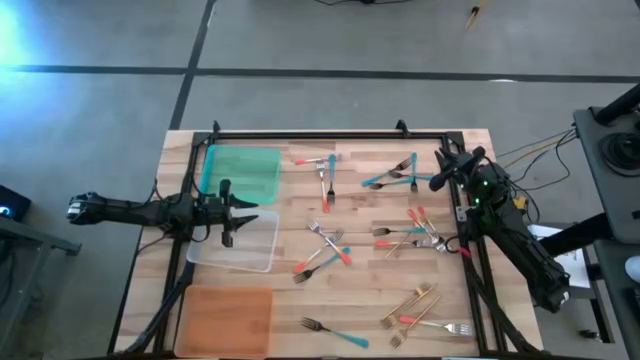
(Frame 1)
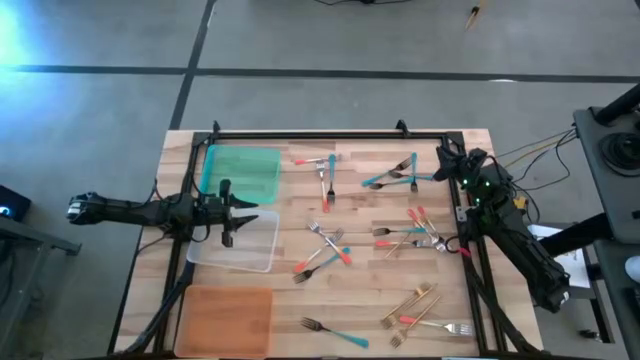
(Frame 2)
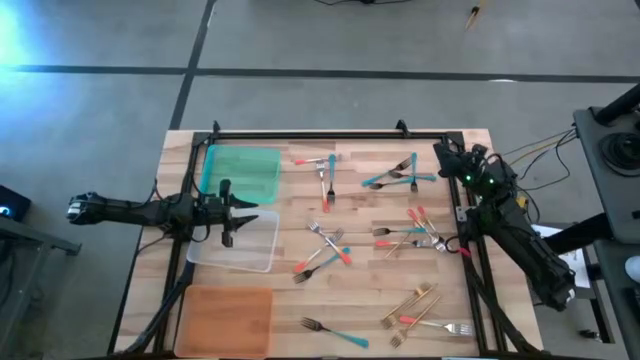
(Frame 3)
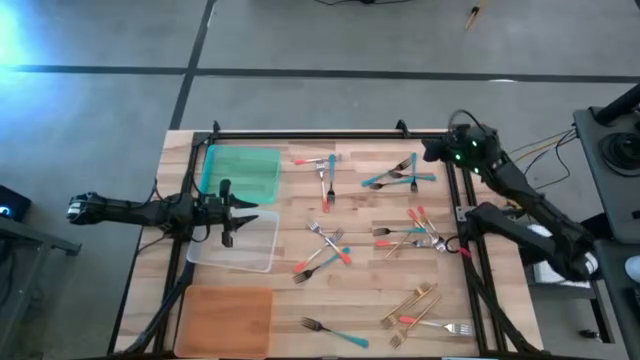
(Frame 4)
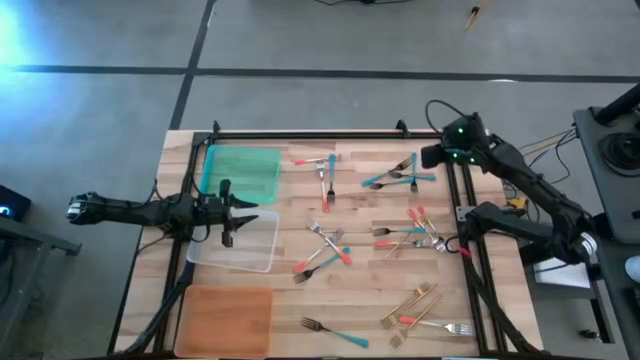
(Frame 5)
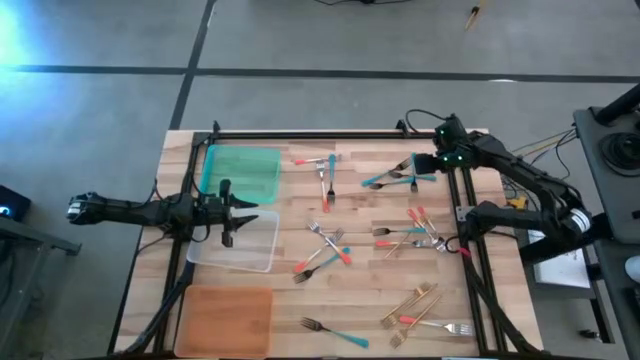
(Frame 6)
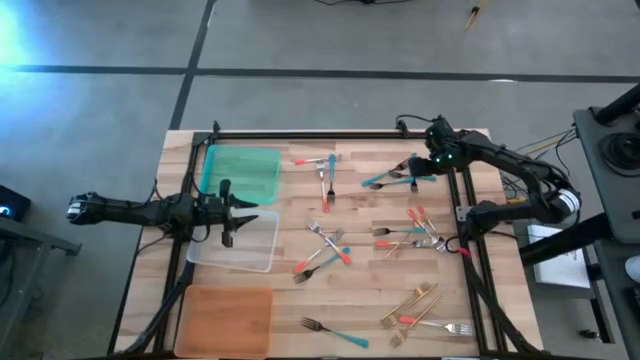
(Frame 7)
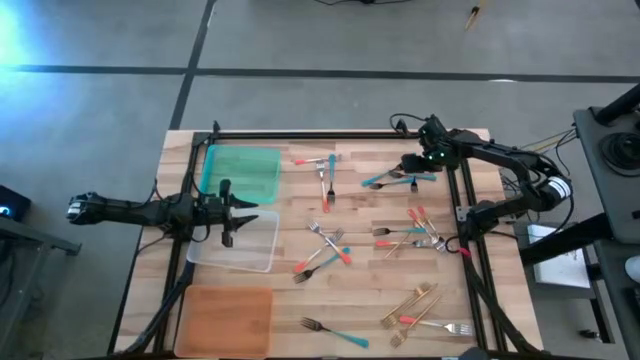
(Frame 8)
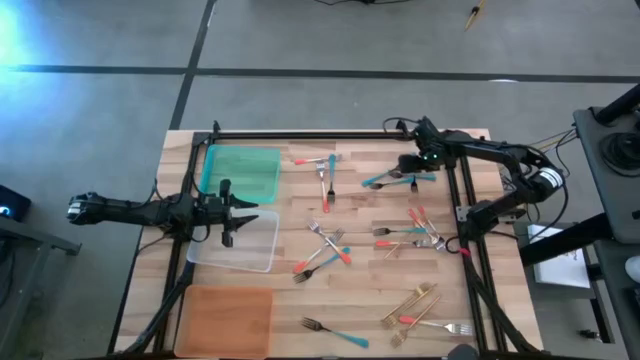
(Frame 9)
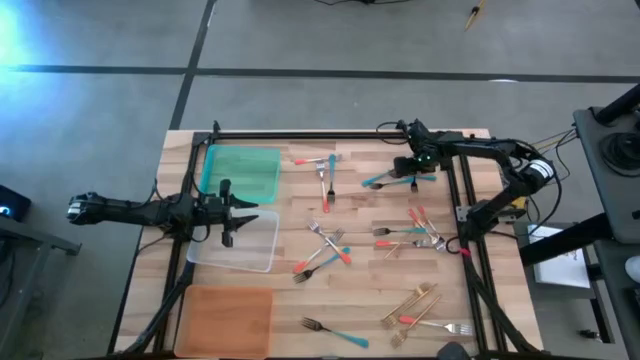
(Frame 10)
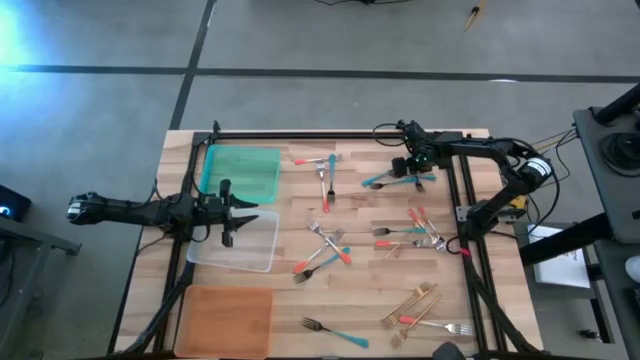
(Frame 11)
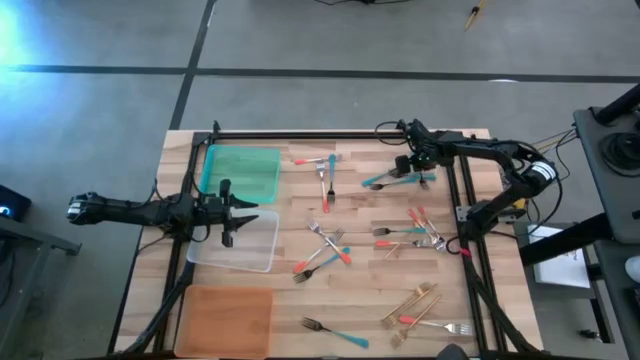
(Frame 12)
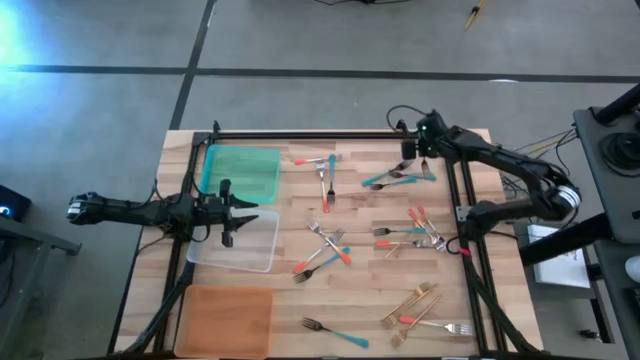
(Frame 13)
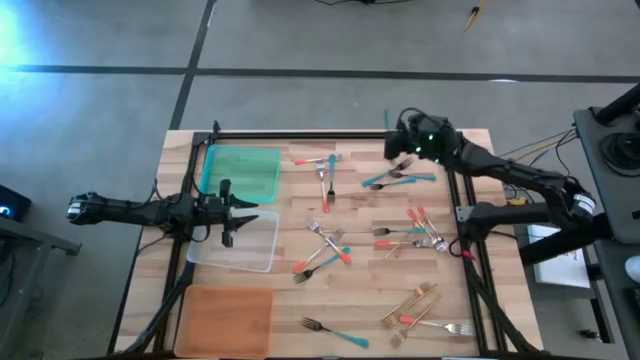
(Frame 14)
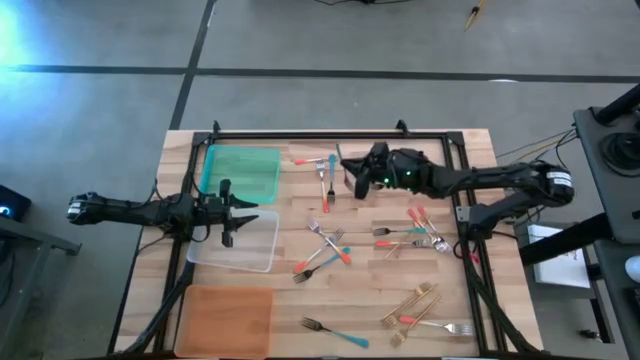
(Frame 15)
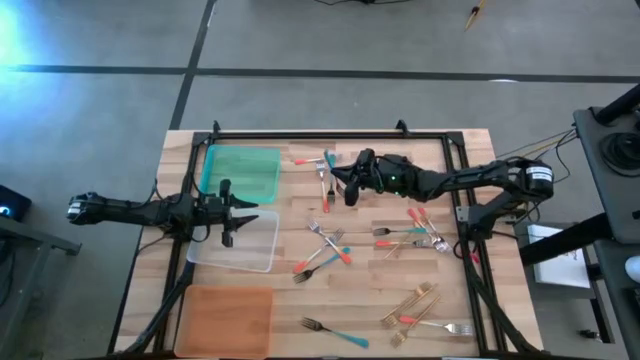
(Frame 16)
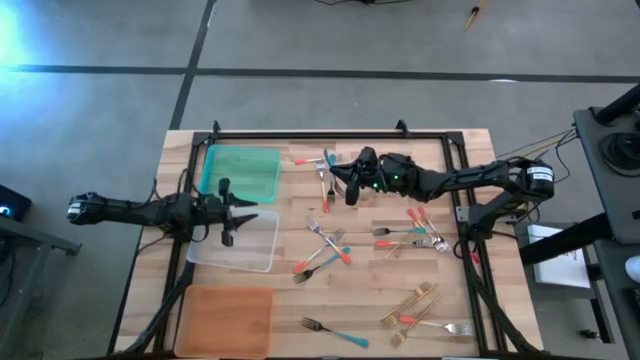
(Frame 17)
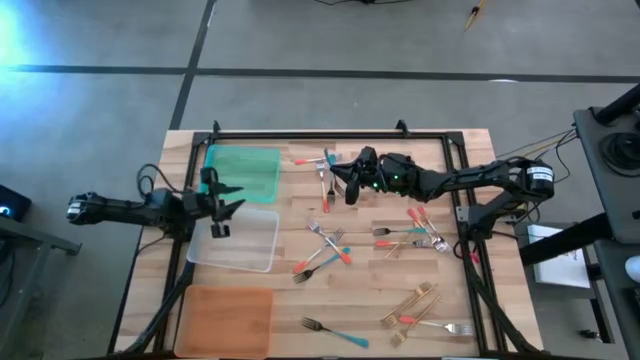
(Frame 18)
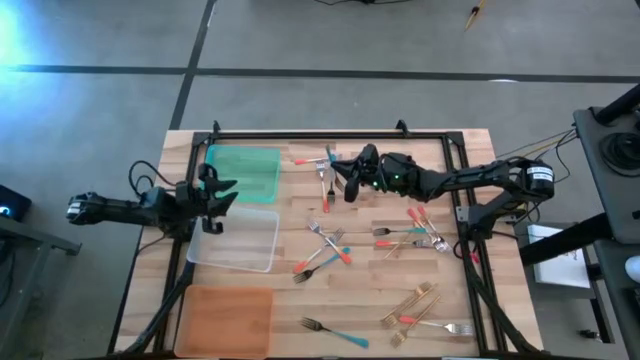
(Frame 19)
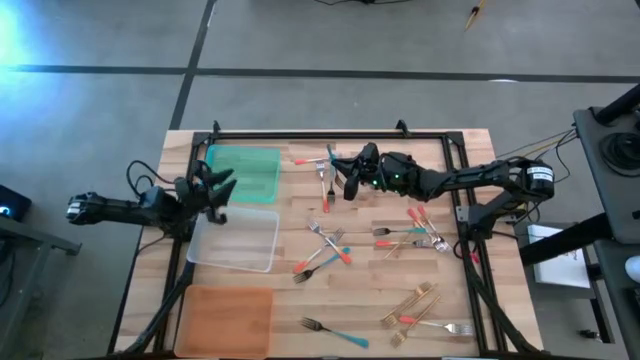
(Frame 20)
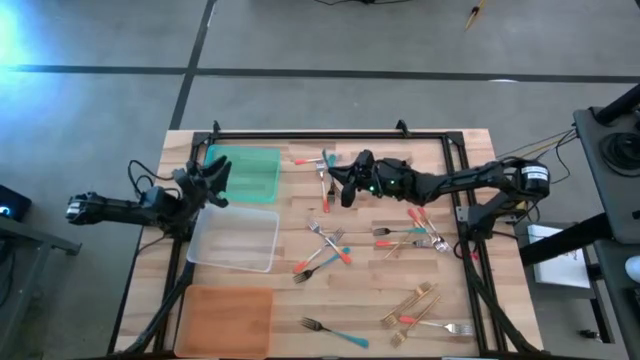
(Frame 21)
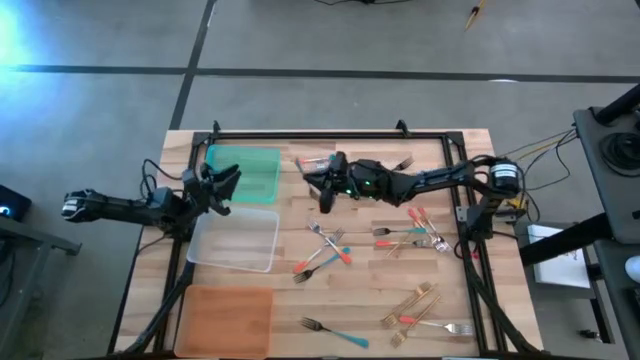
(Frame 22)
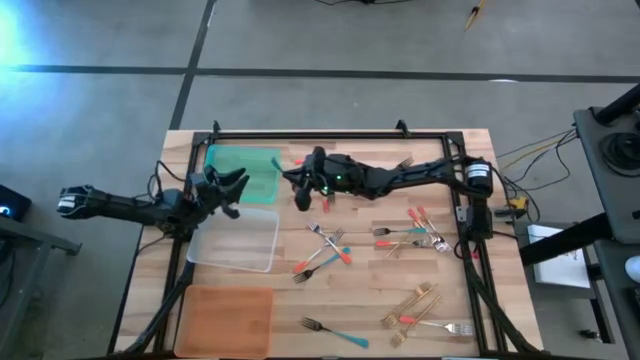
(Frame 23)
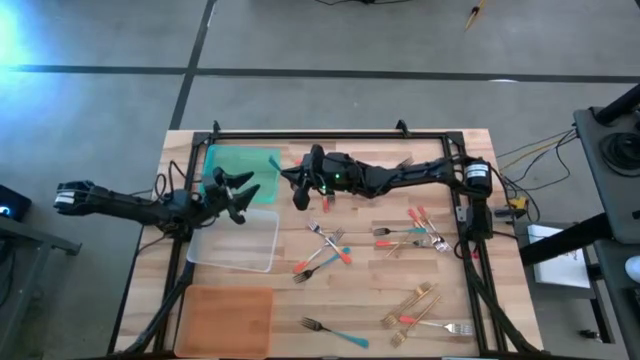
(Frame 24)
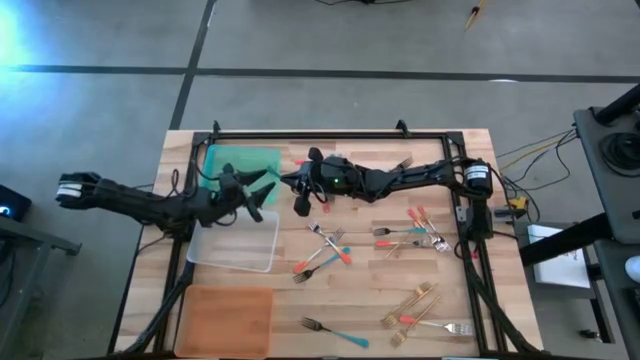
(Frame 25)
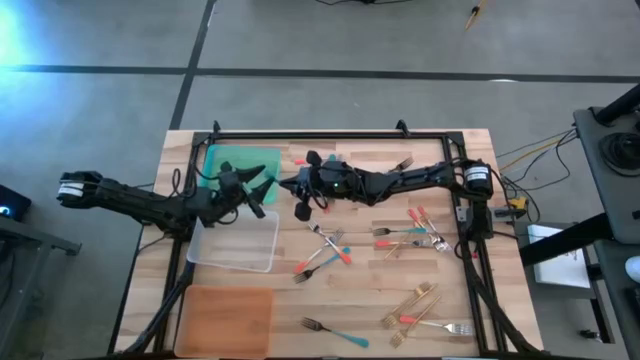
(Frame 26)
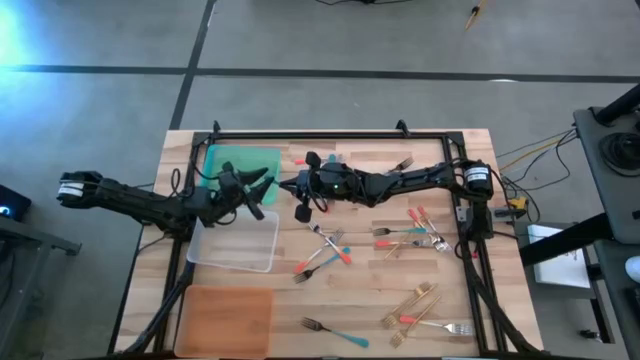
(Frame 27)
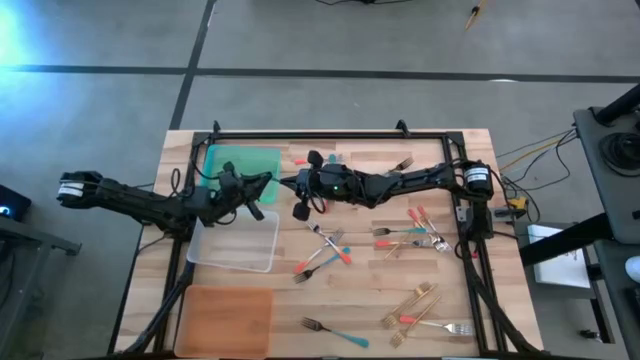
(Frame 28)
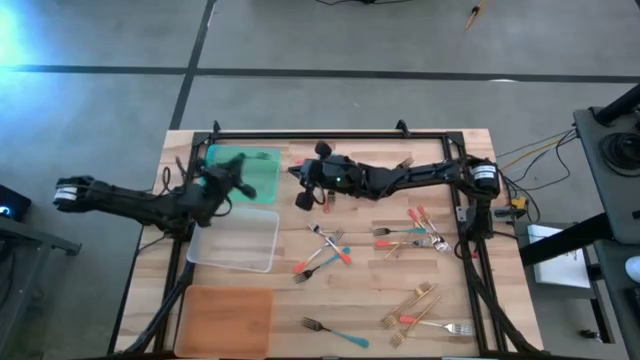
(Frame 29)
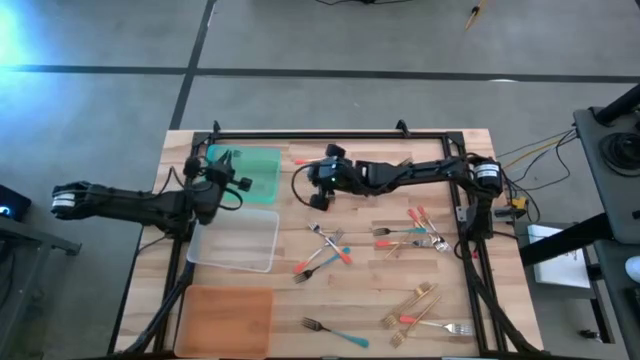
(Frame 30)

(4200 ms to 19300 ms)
Task: Sort silverware by color (type)
Put the blue fork into the blue bin

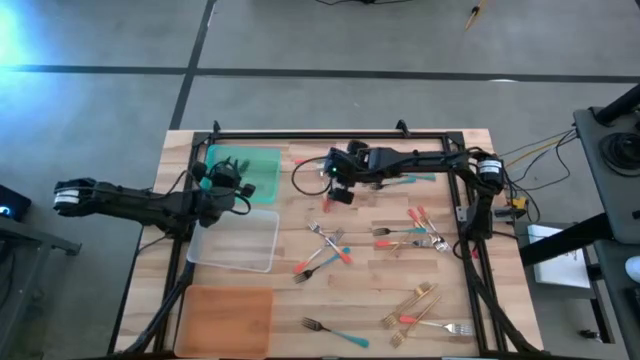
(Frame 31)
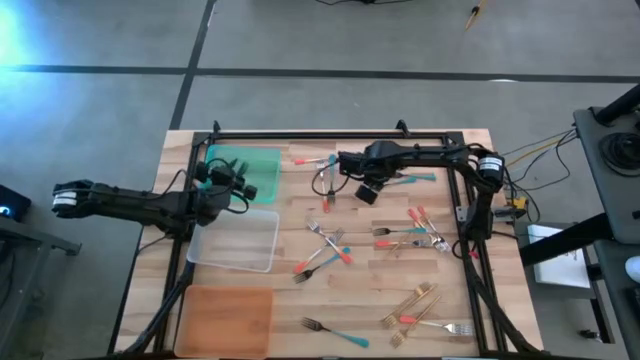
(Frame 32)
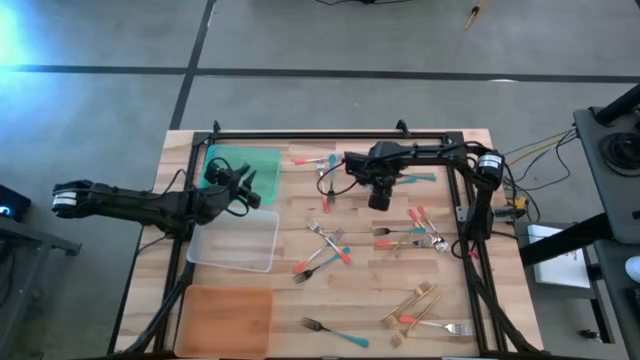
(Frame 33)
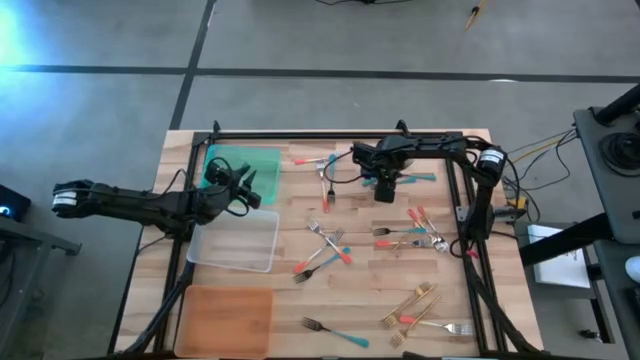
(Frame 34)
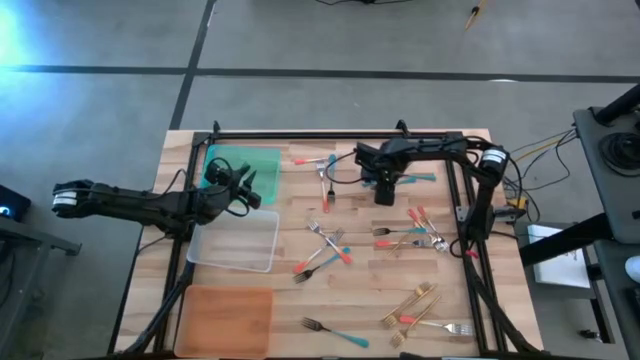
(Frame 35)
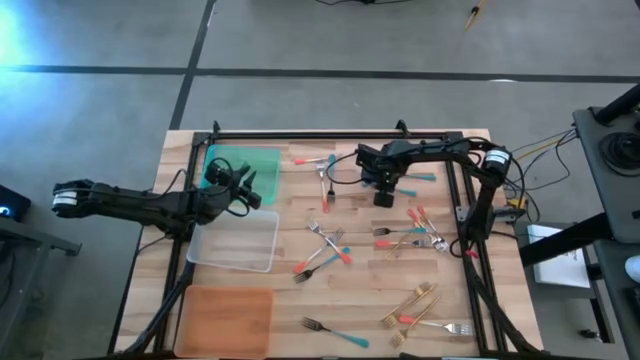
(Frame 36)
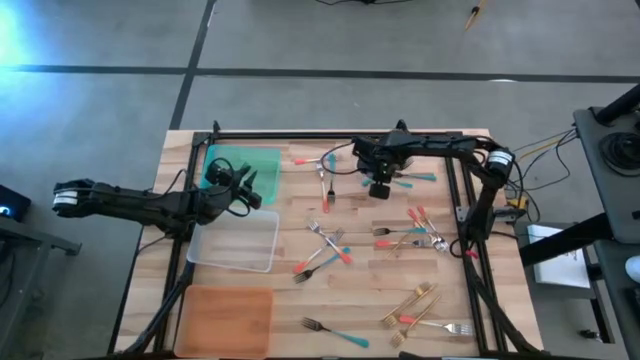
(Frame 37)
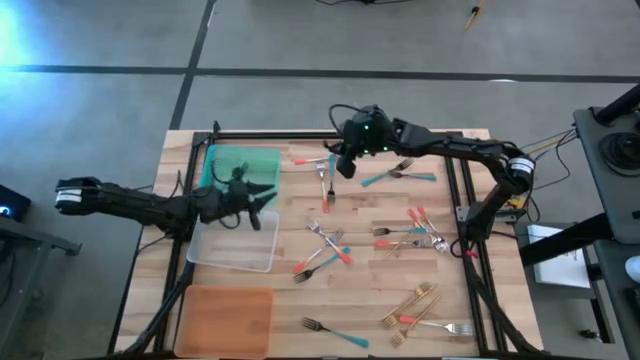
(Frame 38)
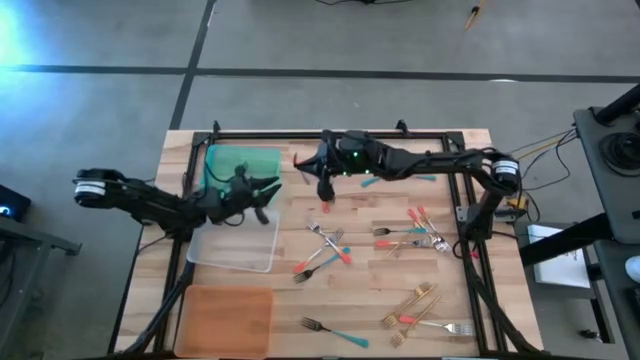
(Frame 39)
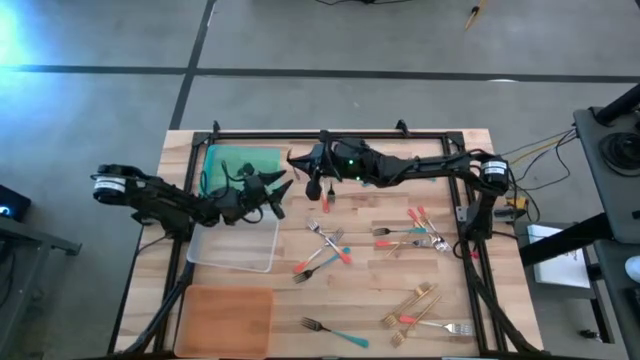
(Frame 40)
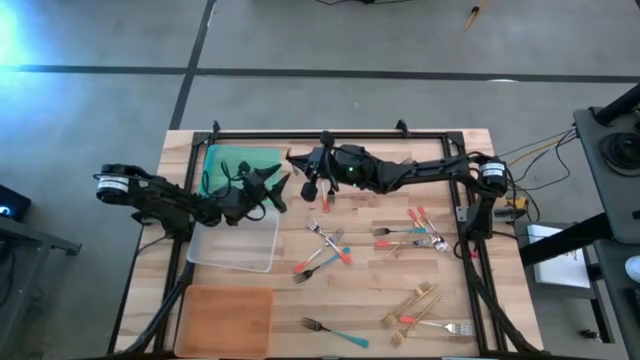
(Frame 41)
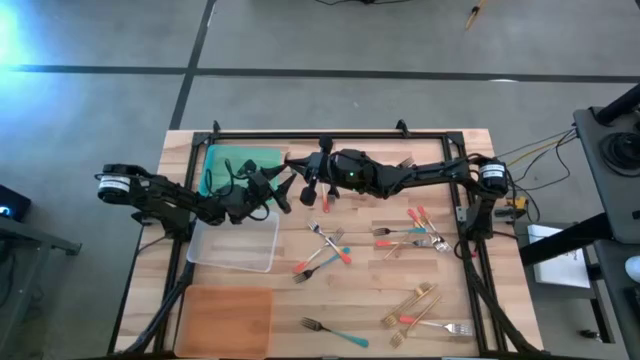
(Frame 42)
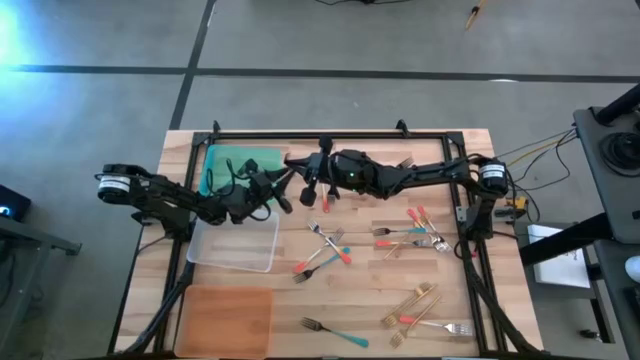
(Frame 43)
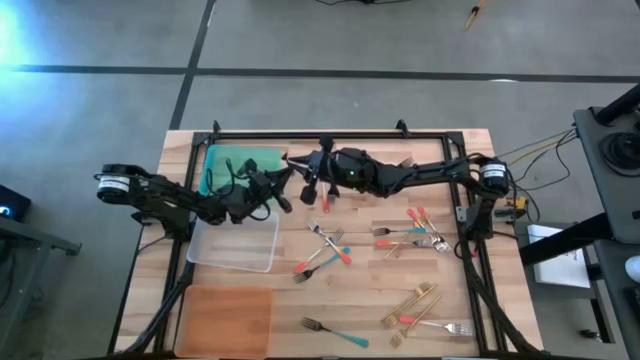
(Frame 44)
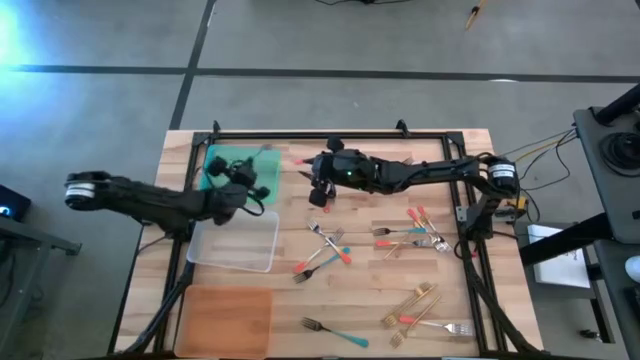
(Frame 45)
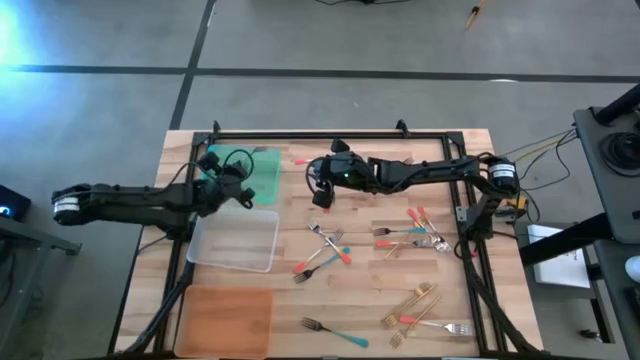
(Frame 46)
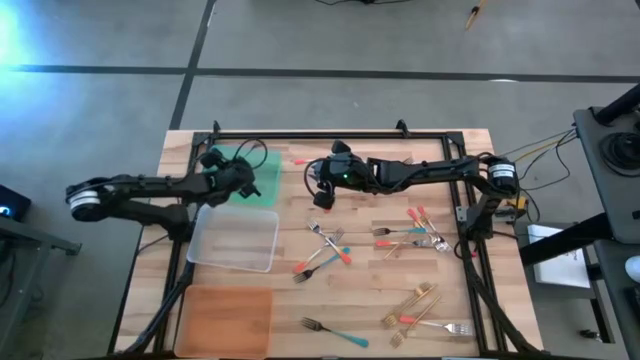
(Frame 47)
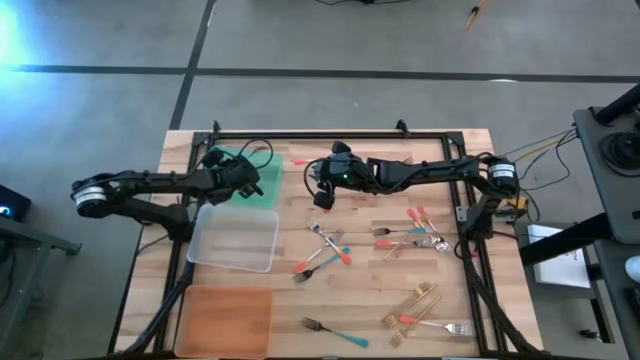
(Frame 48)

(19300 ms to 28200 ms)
Put the blue fork into the blue bin
